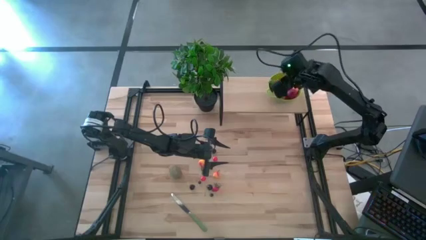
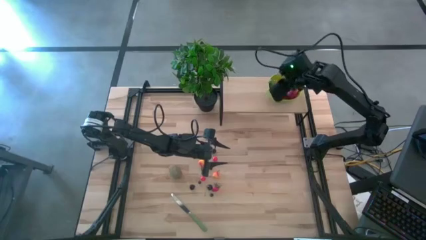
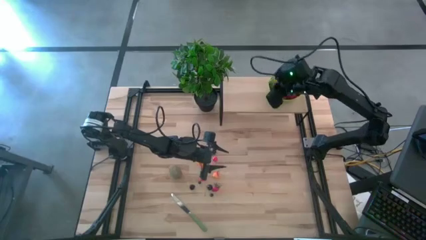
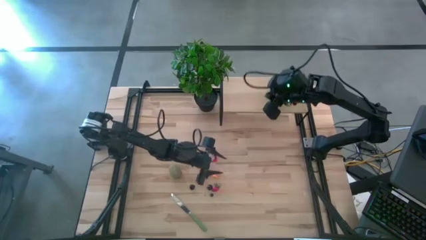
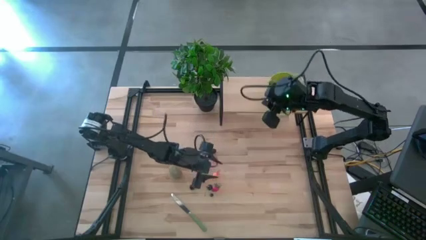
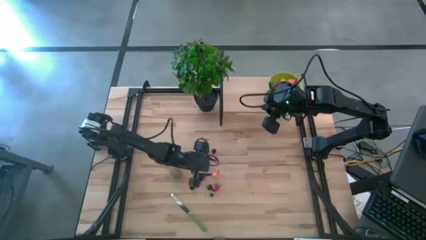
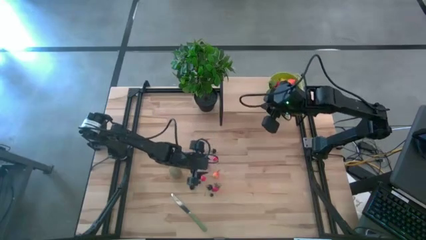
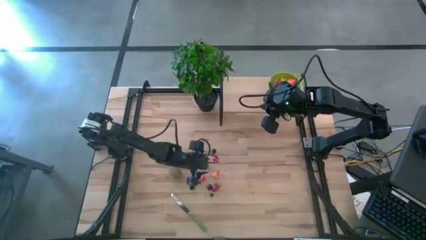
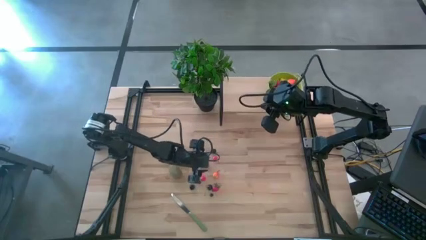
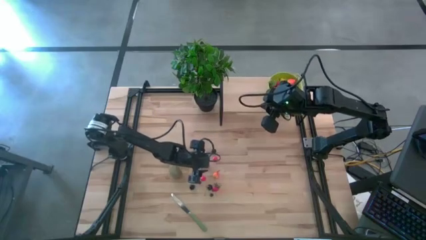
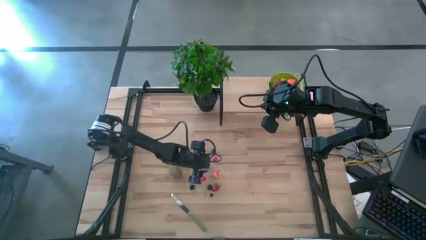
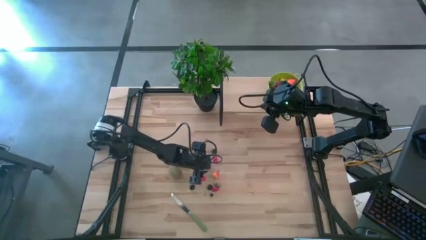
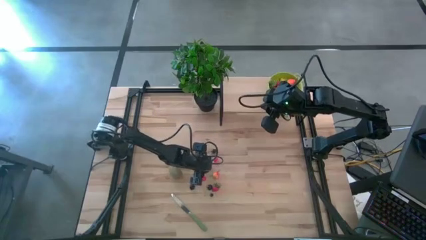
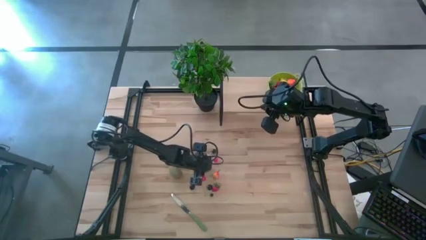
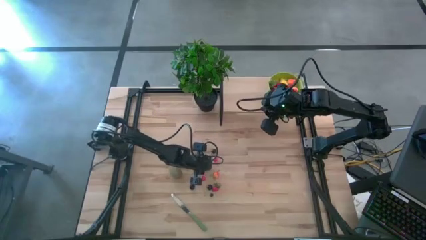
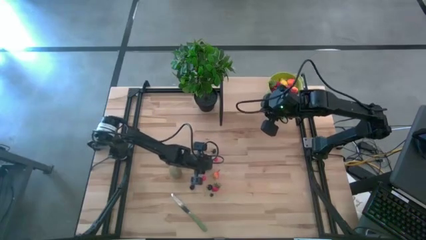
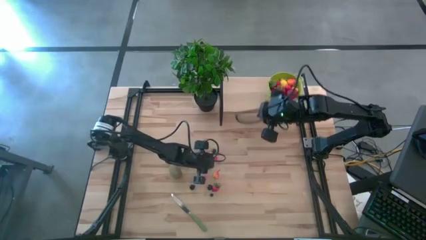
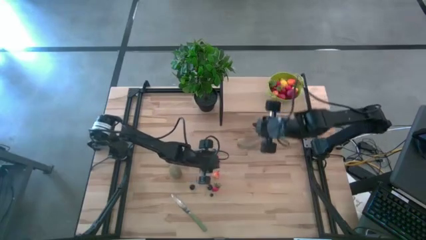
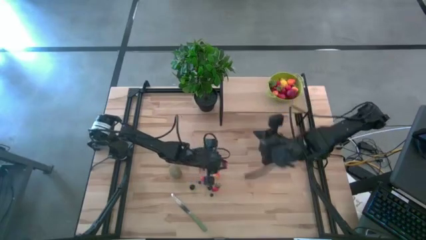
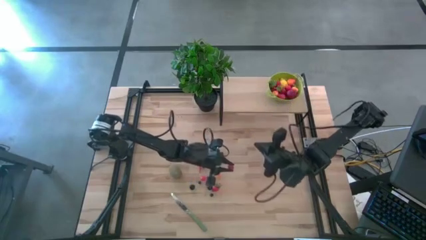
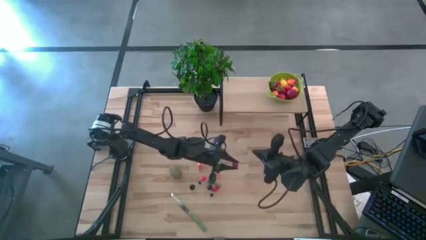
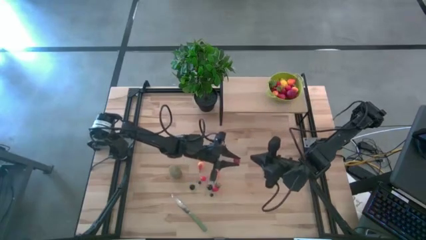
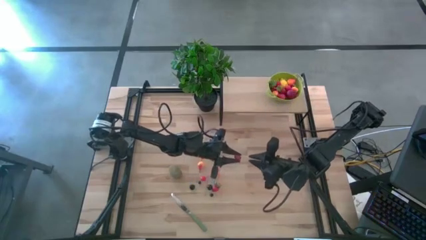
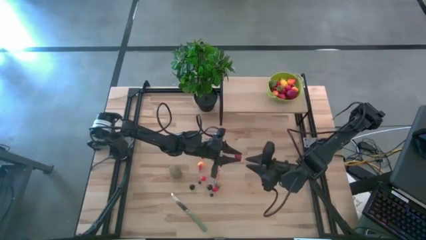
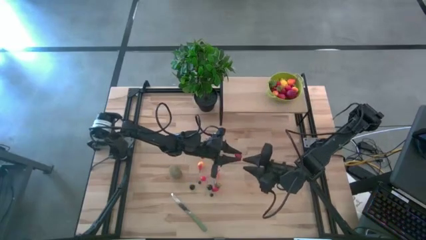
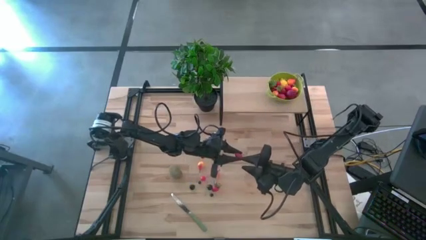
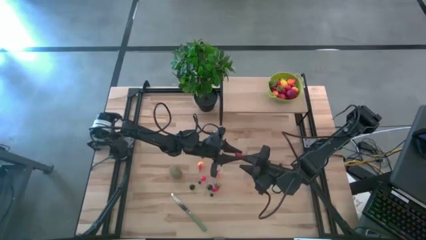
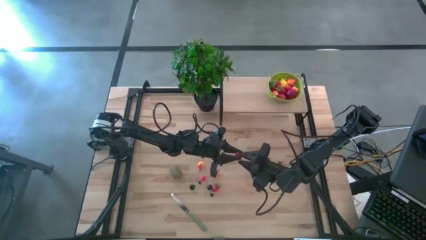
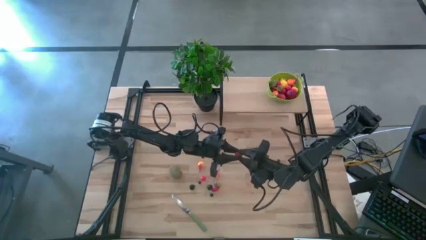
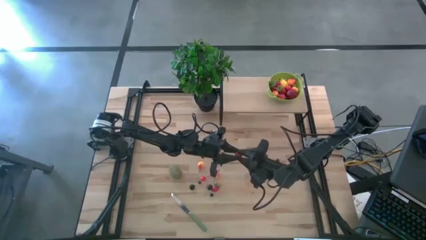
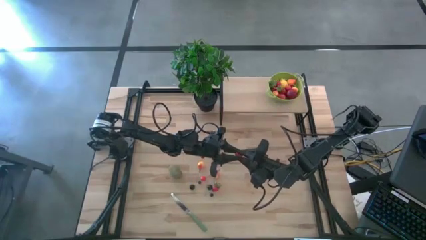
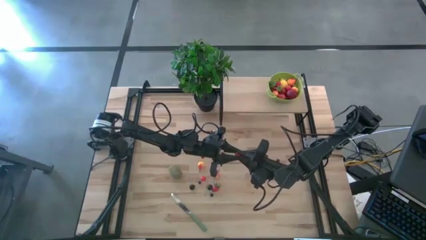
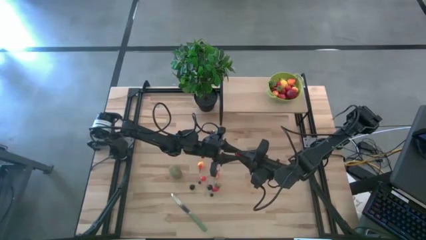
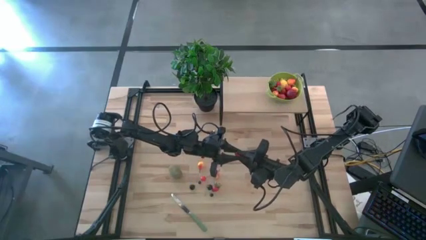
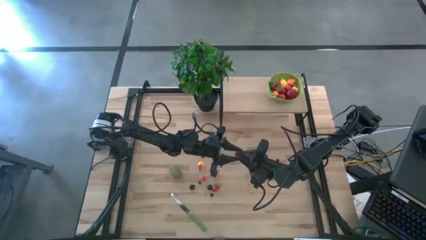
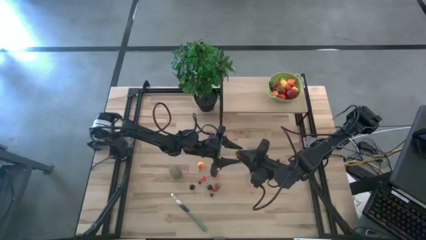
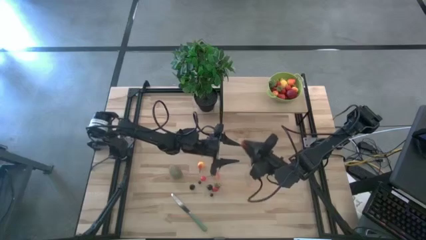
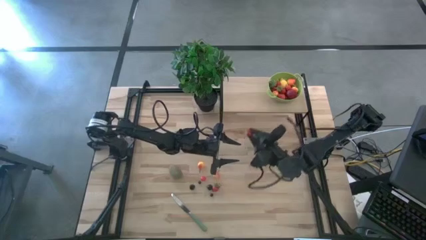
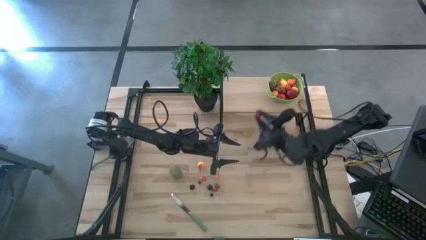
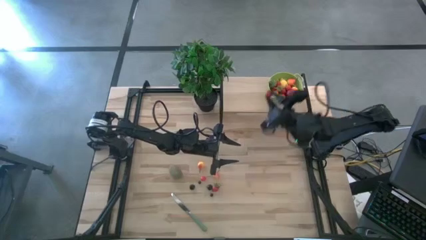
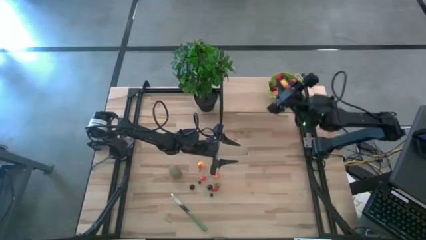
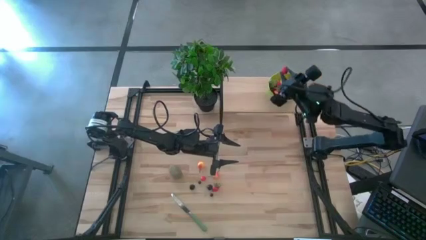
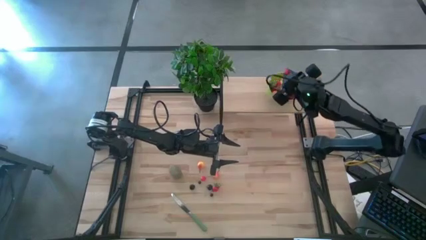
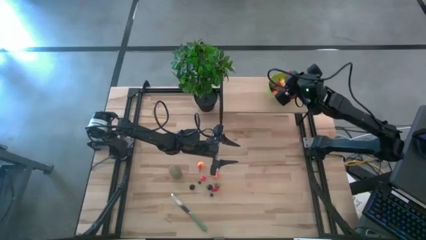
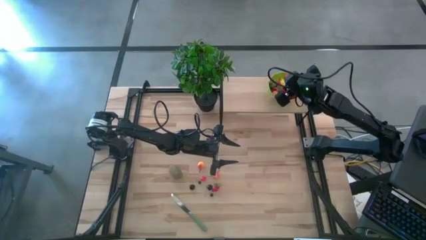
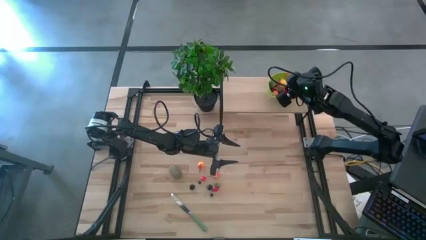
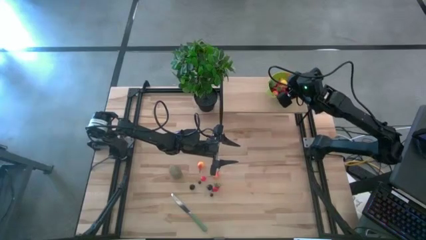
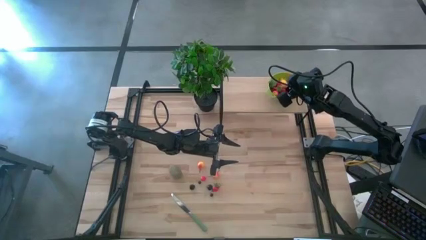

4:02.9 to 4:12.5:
Task: Pick & Place Fruit
Put the raspberry into the green strainer bowl on the shelf

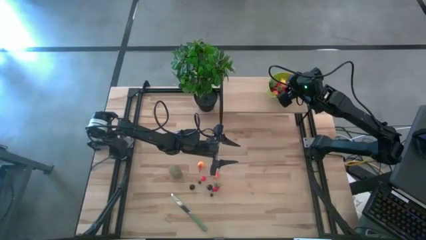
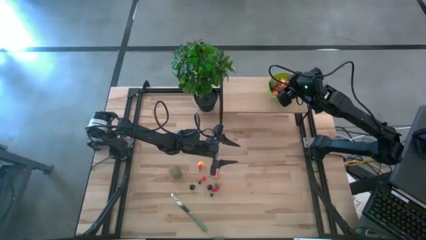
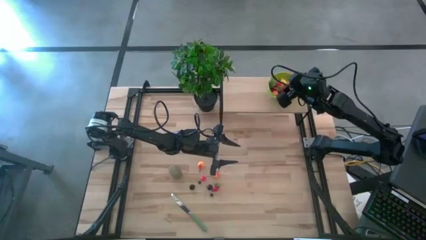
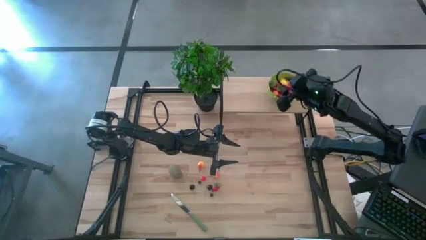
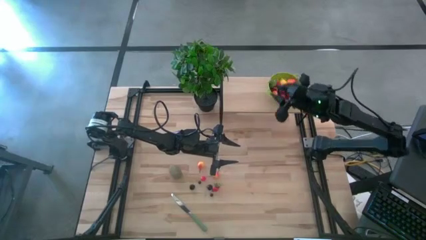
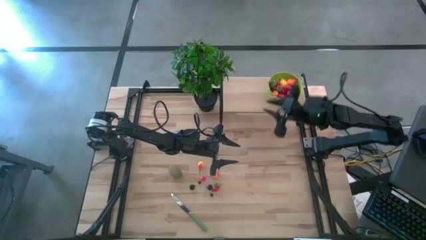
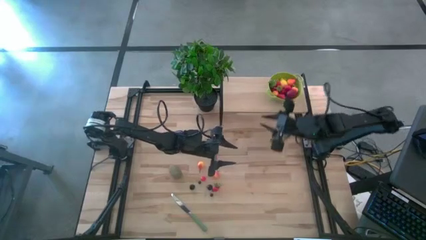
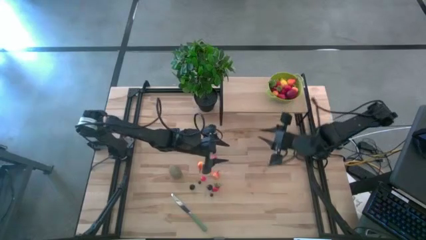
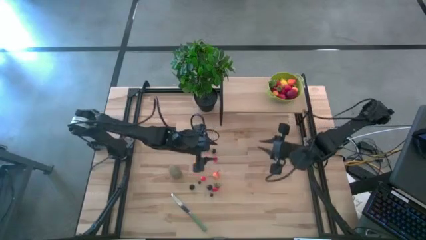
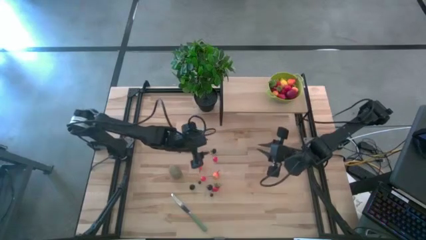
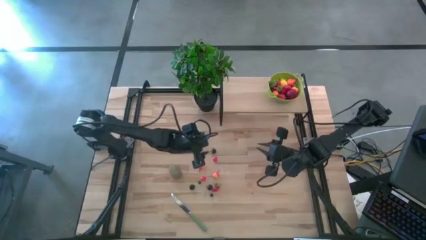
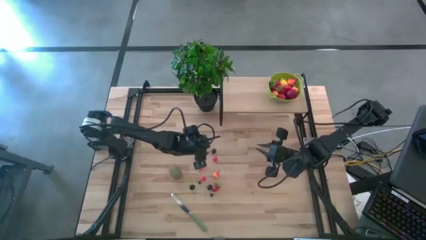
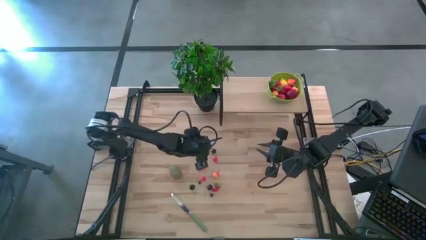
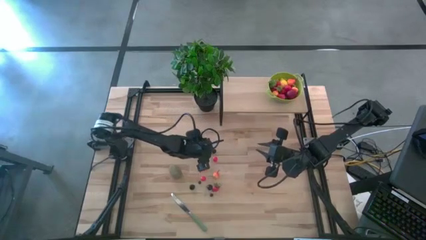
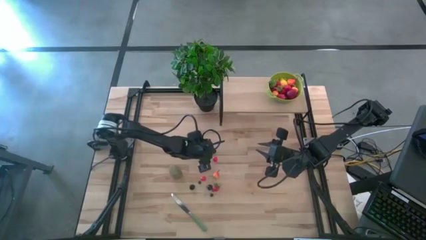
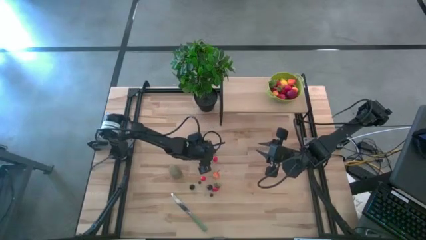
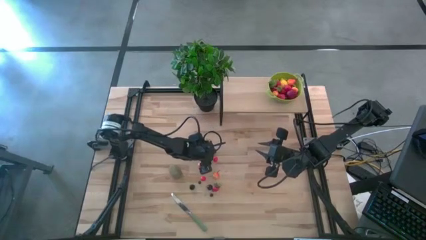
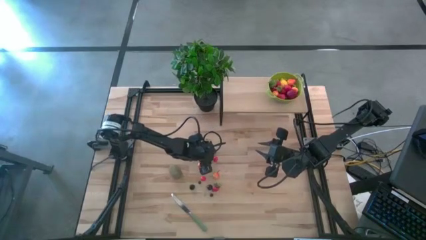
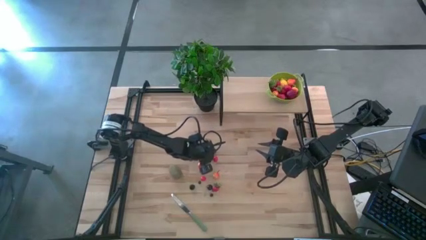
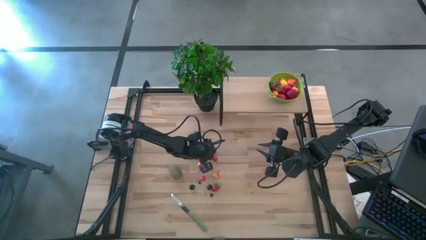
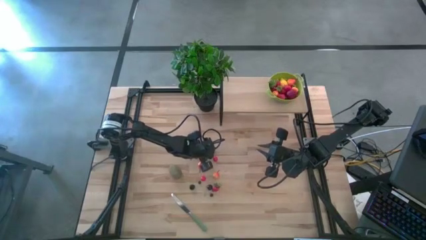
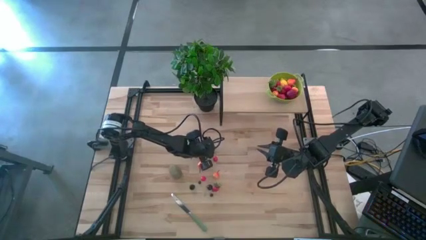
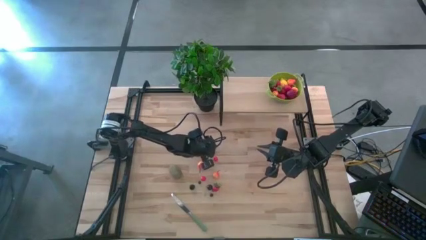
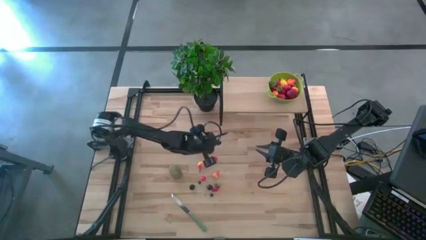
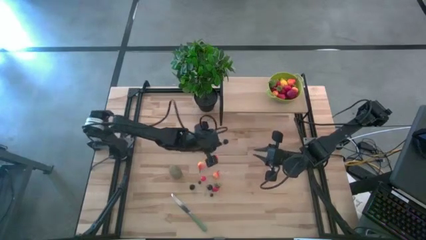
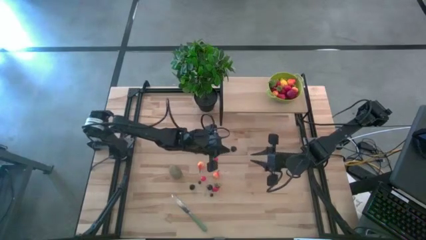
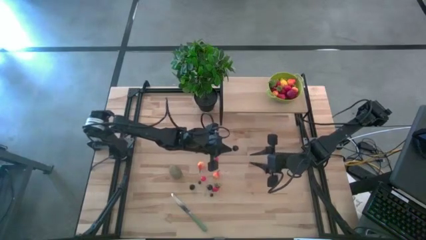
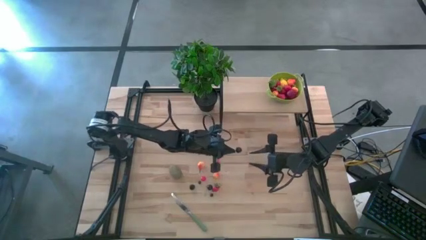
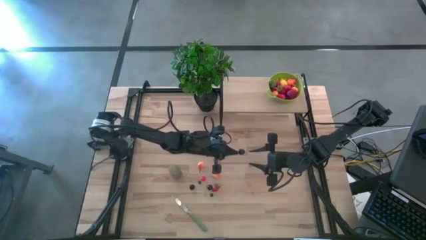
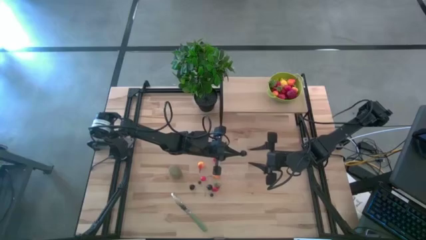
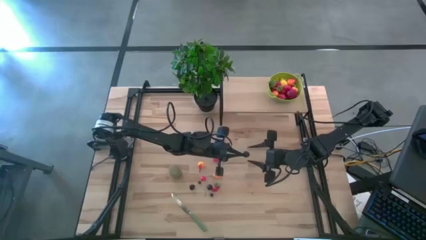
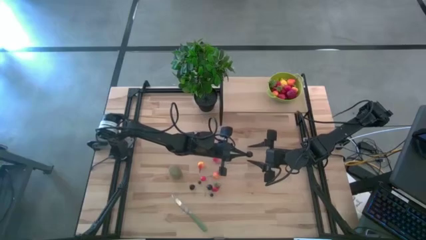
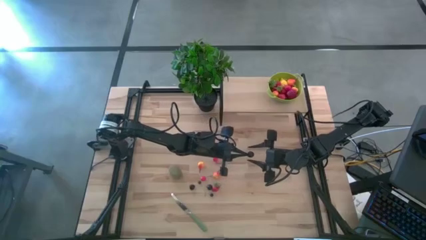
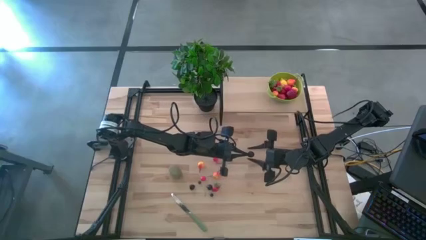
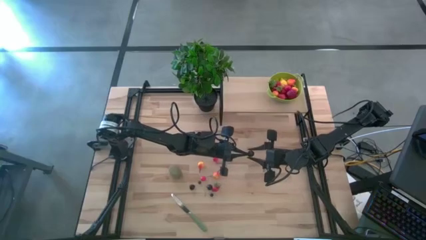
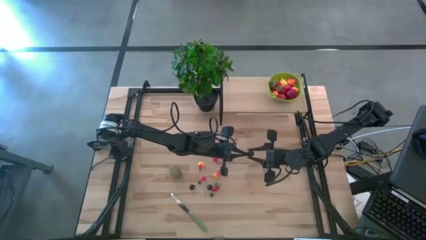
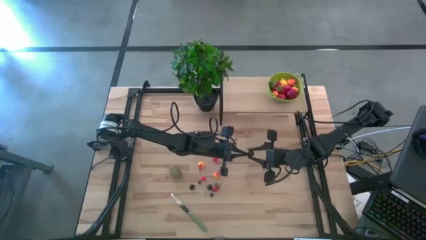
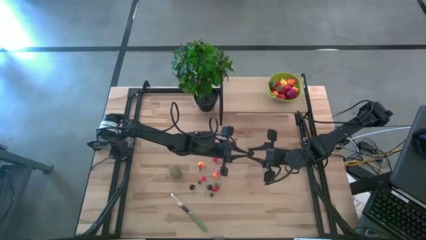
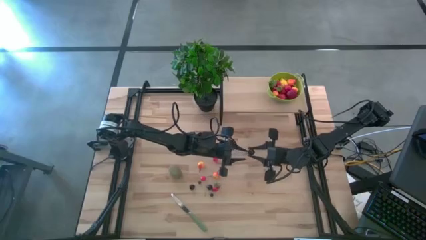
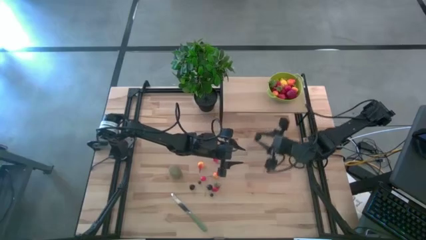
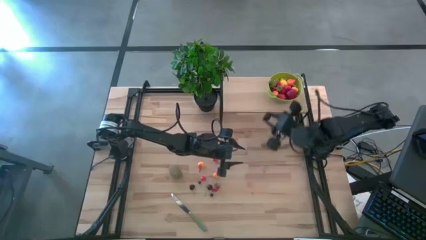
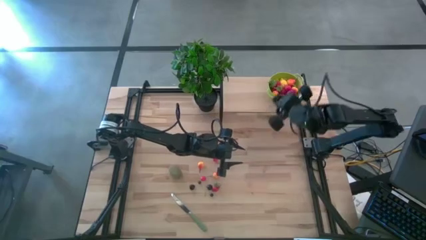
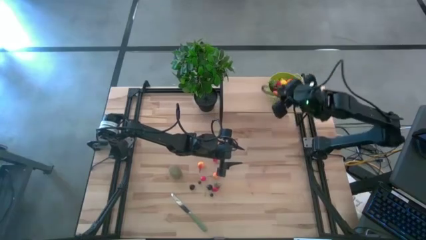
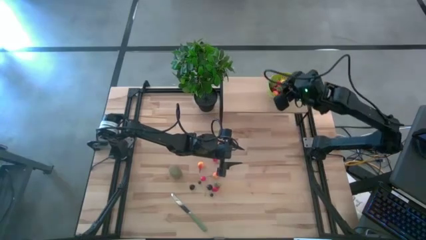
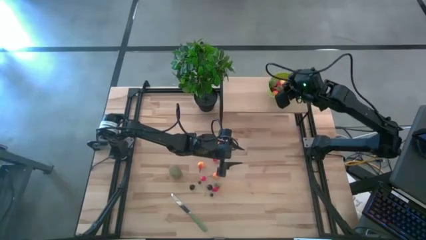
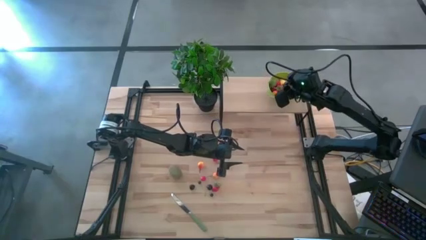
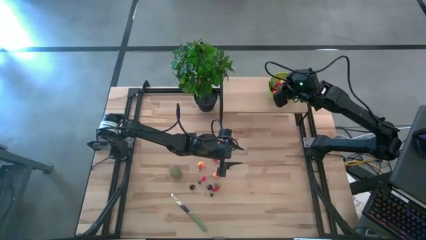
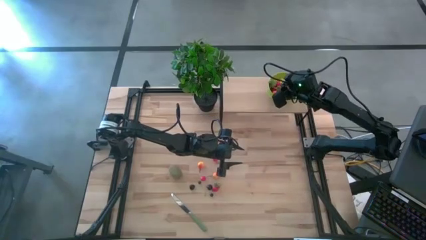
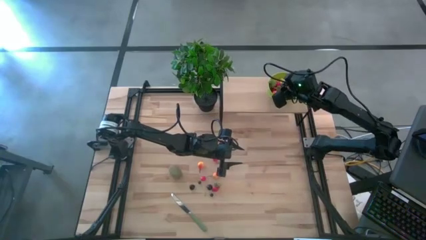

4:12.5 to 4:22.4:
Put the black cherry into the green strainer bowl on the shelf
